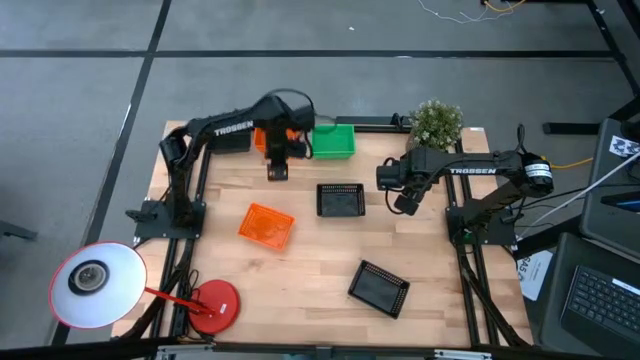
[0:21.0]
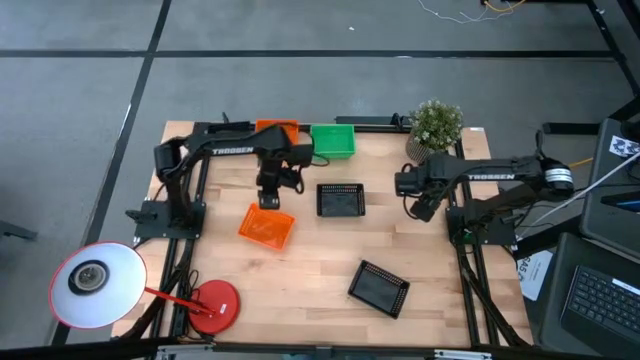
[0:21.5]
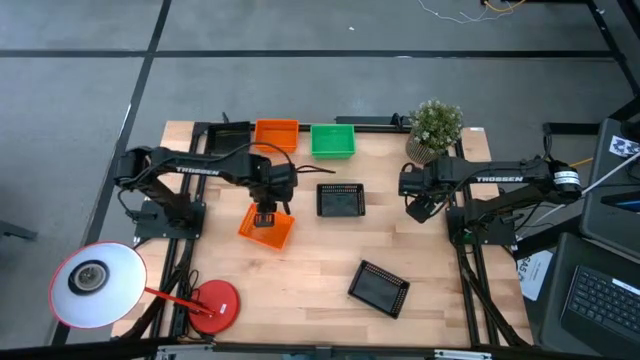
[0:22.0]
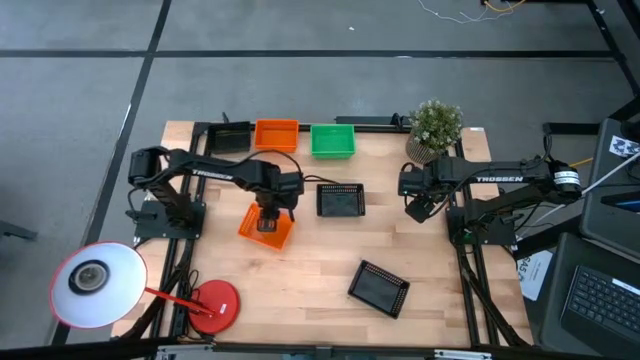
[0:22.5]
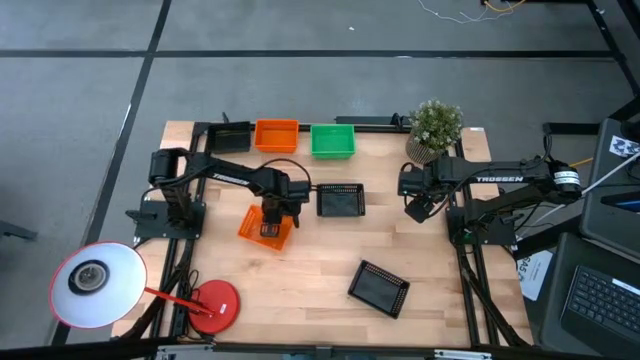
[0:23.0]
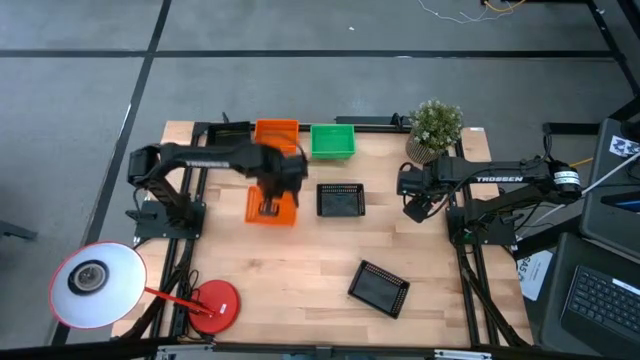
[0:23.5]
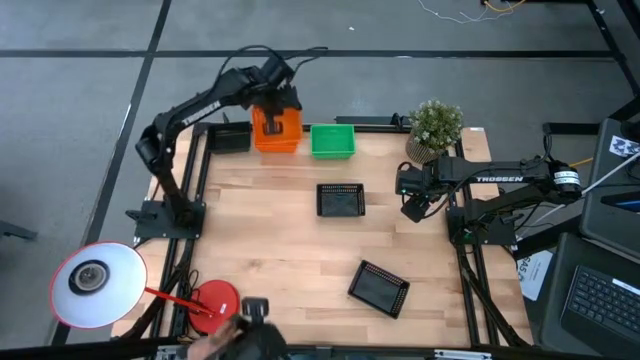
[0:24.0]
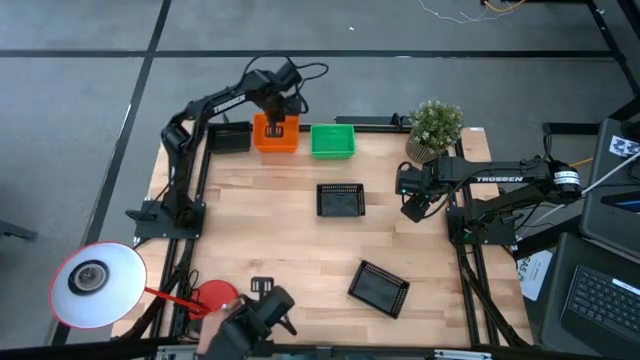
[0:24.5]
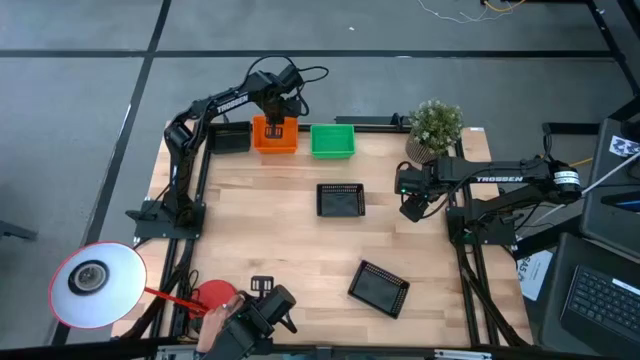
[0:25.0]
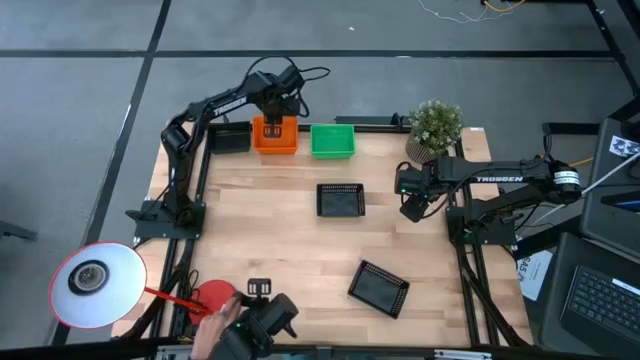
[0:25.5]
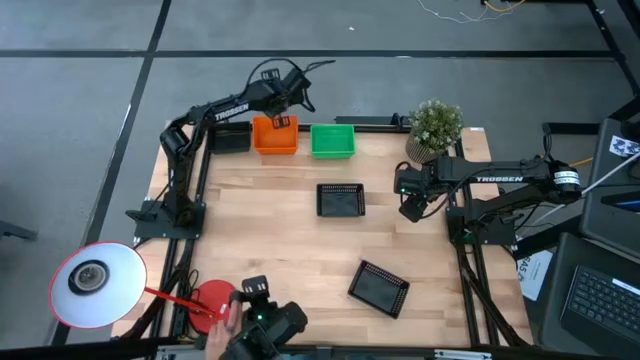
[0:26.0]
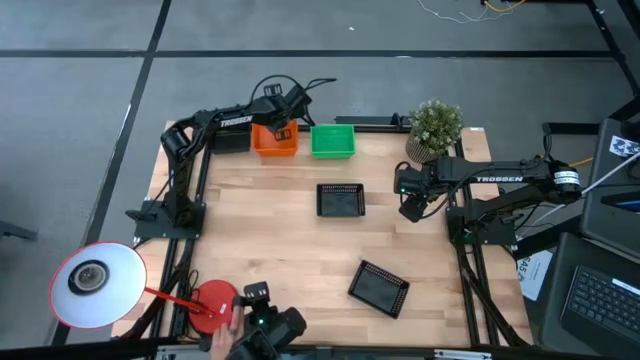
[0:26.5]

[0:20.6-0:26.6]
Stack the bottom orange bin on top of the top orange bin

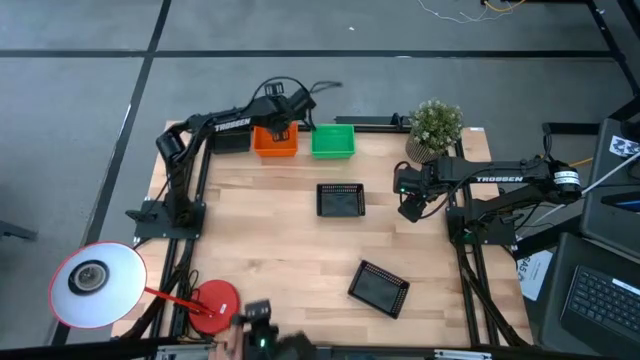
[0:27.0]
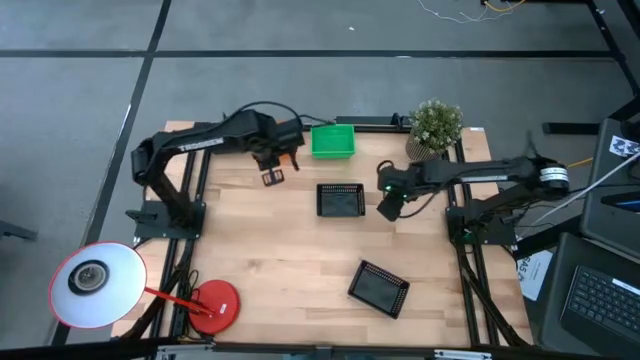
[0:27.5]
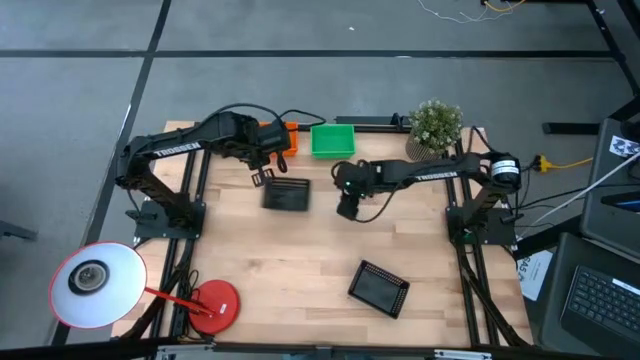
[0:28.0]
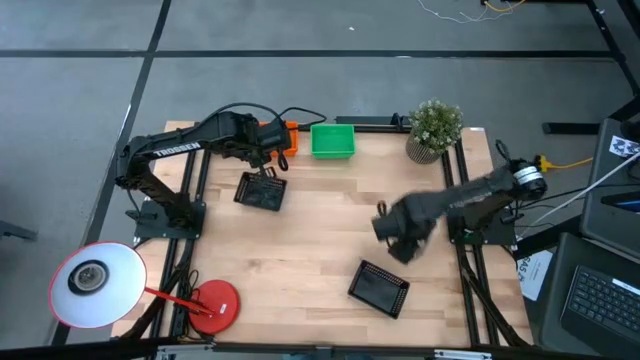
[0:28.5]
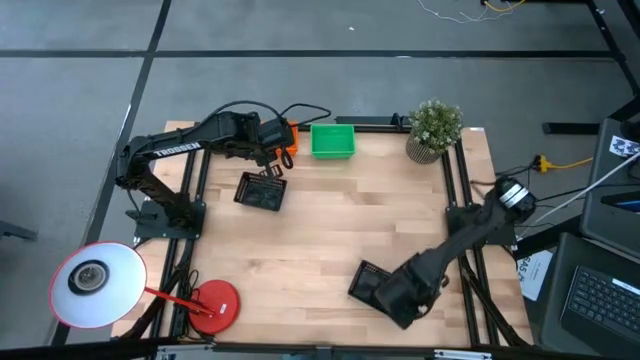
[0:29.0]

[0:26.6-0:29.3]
Adjust the black bins

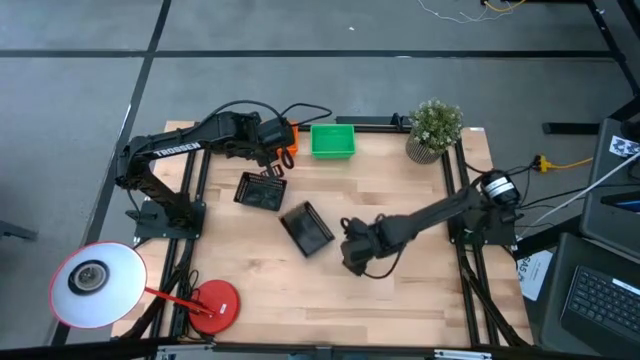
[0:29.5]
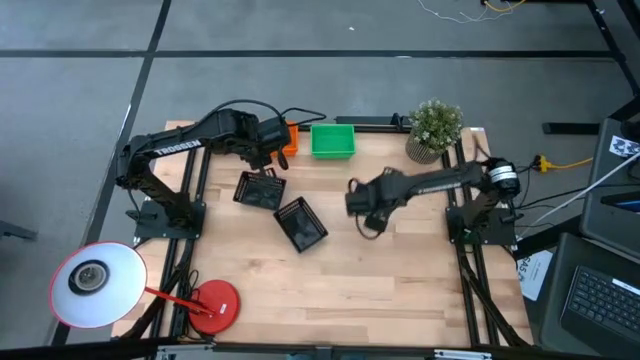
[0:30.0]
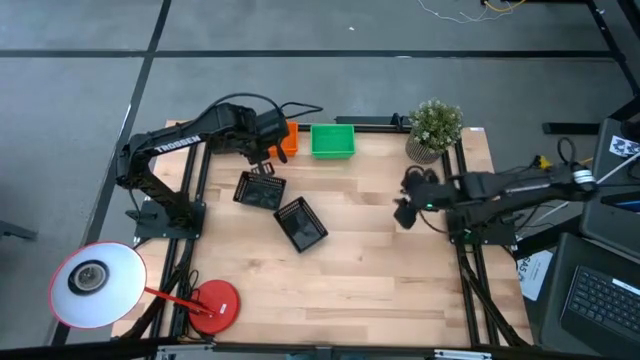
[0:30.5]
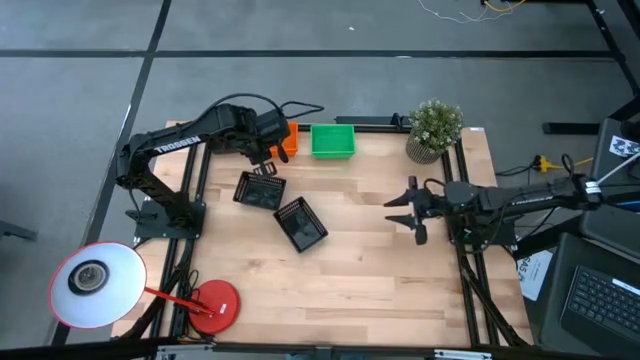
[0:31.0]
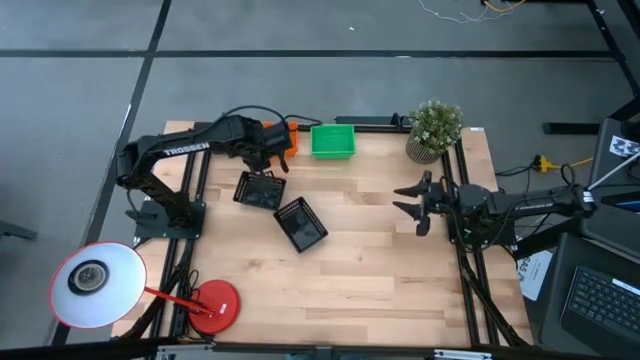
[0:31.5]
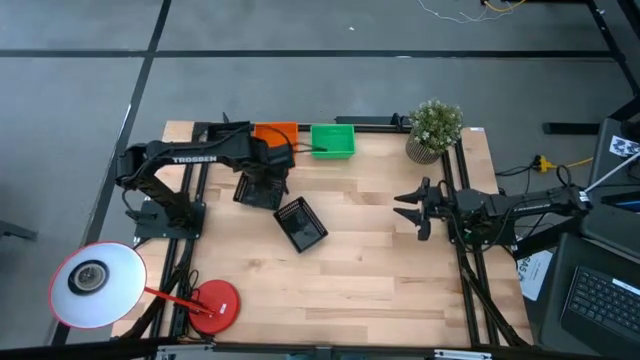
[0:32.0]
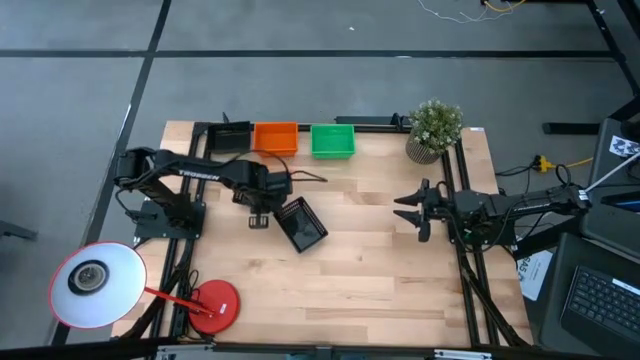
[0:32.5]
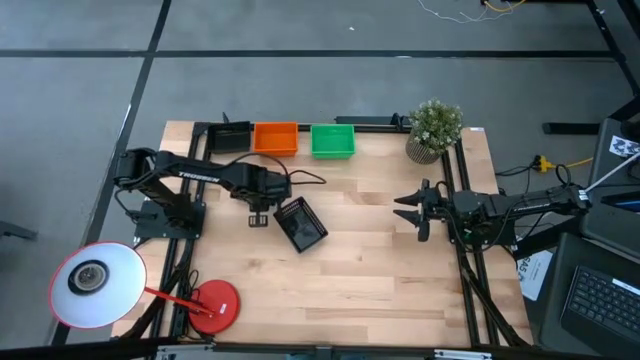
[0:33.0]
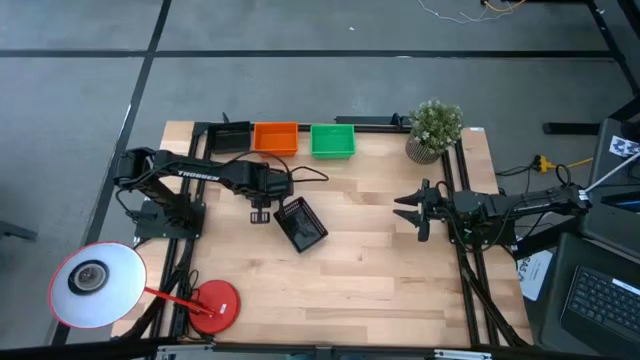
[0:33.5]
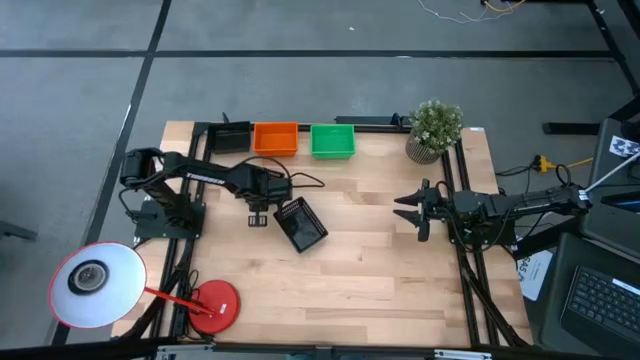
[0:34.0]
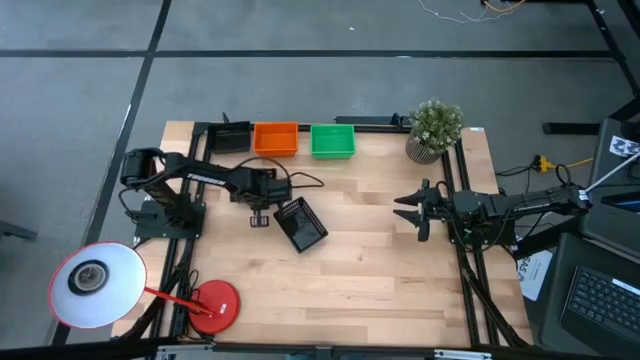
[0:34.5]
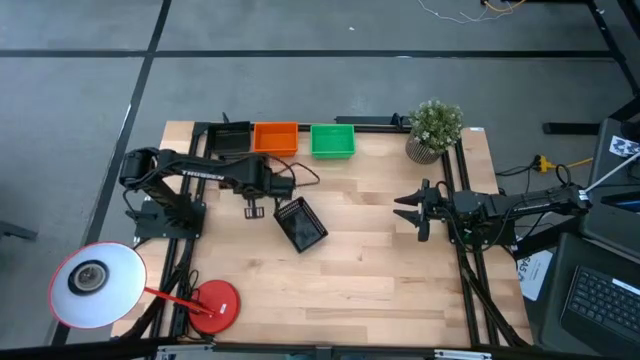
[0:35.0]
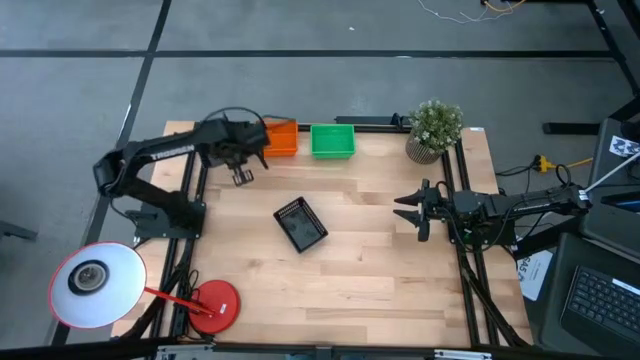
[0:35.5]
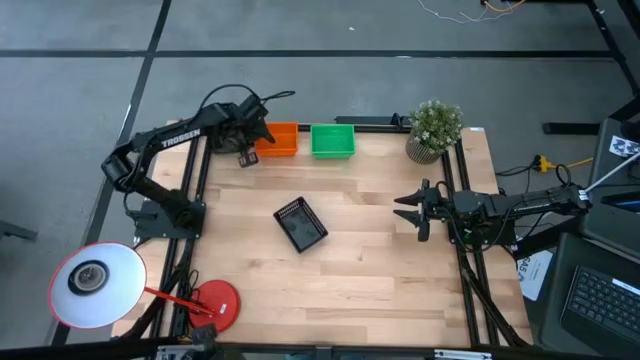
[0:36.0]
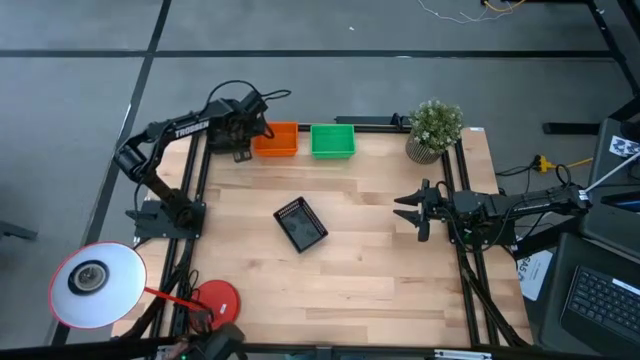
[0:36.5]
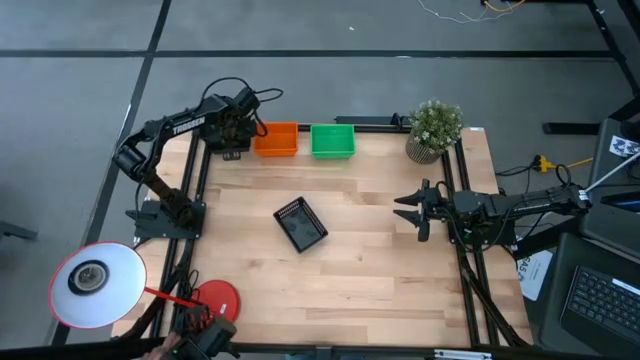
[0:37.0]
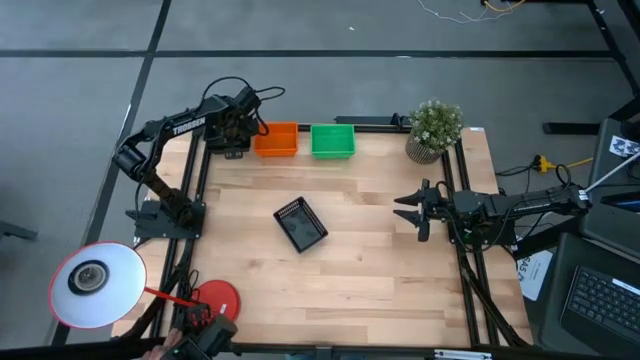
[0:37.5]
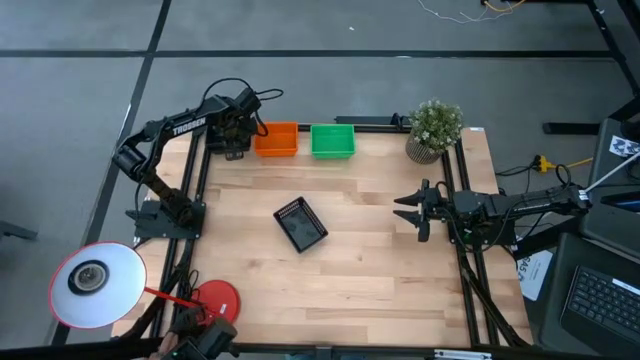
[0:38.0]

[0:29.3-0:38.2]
Stack the middle black bin on top of the top black bin

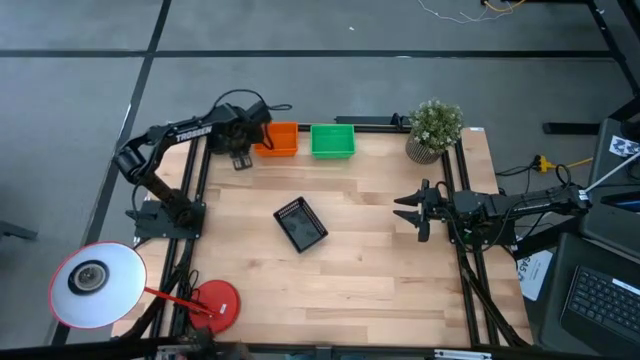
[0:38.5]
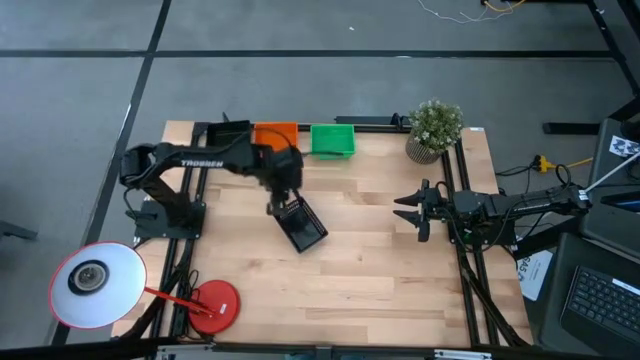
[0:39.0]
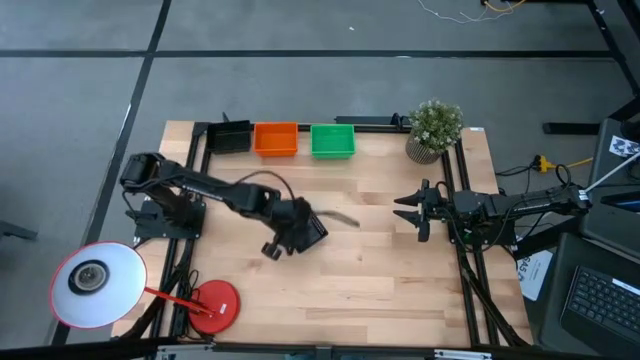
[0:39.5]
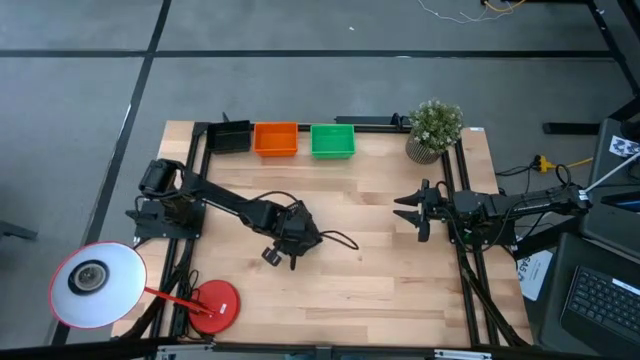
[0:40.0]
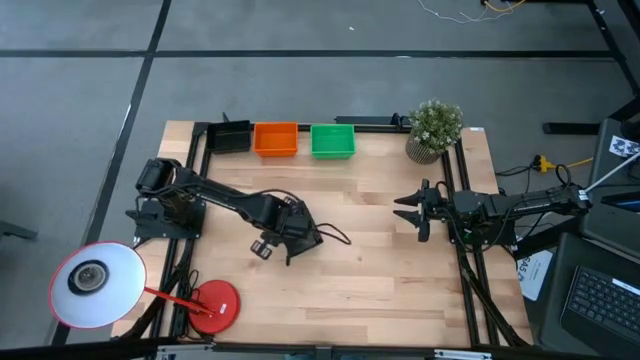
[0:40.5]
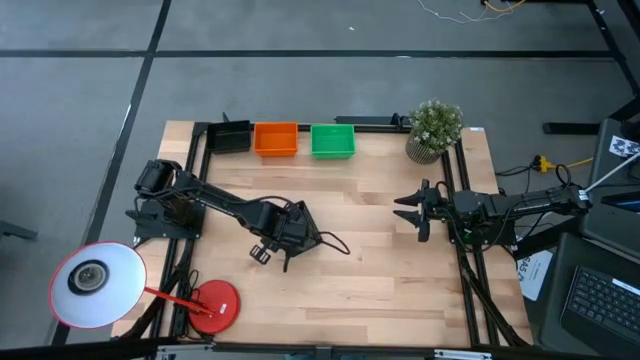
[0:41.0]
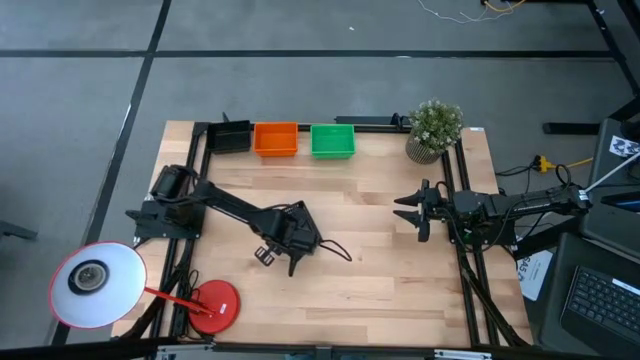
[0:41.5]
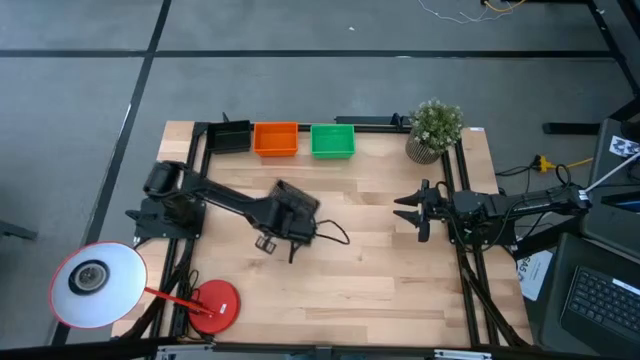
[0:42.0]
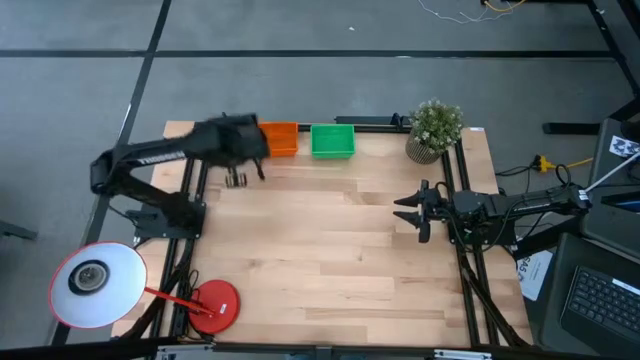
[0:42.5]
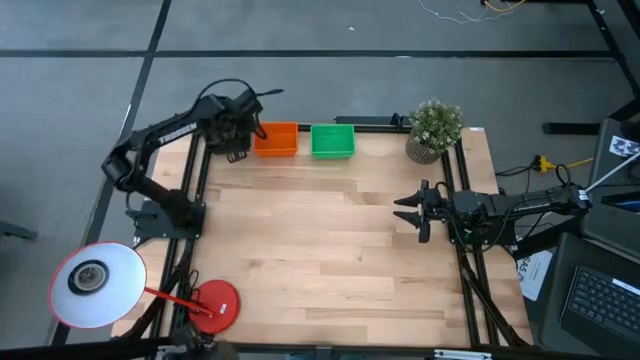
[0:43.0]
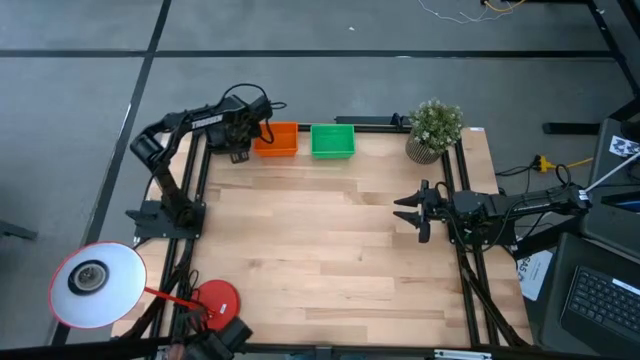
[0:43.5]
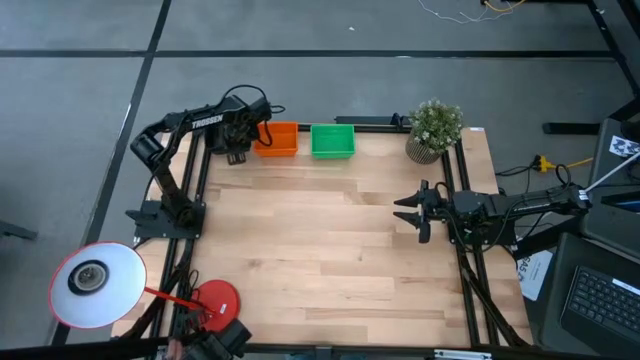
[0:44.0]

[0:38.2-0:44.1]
Stack the bottom black bin on top of the top black bin
